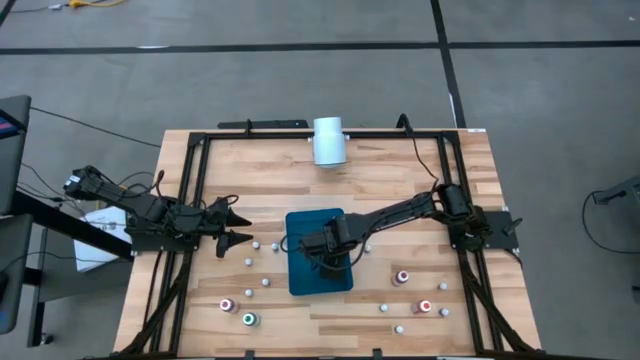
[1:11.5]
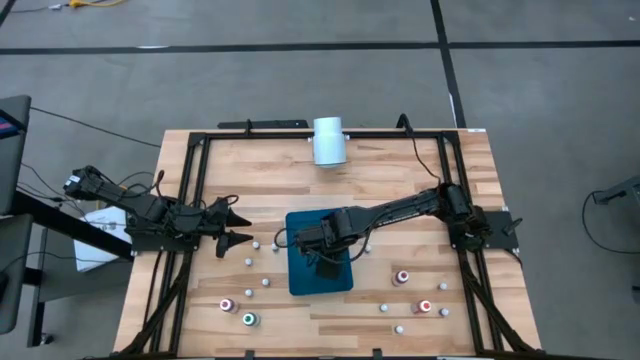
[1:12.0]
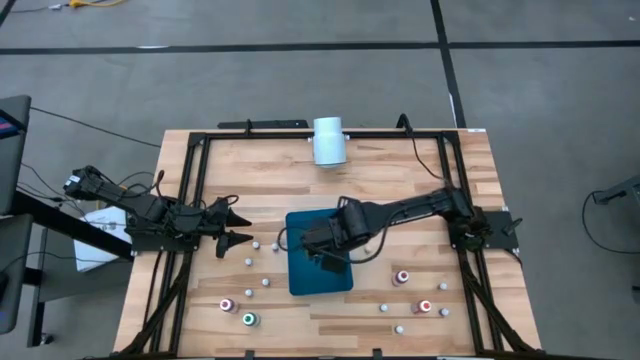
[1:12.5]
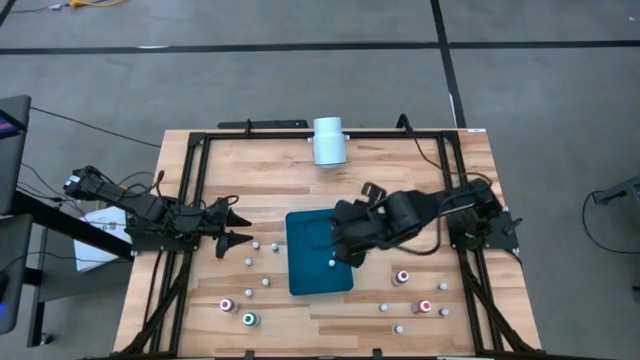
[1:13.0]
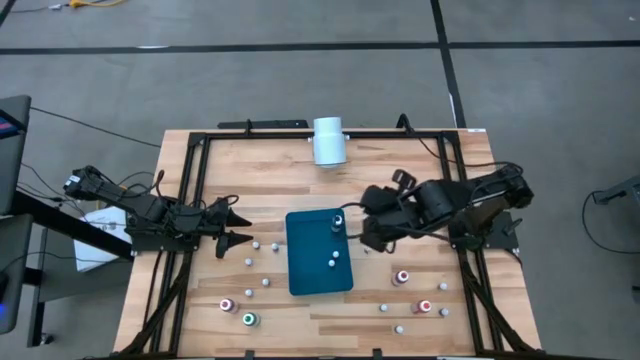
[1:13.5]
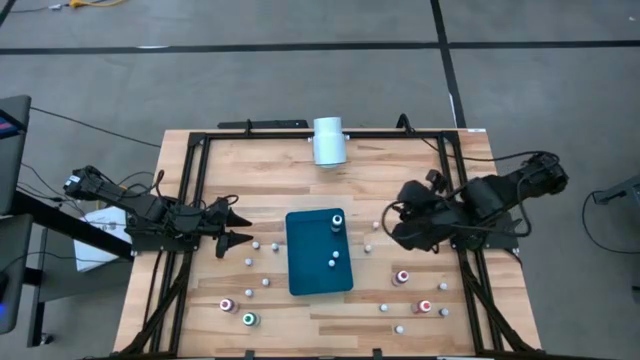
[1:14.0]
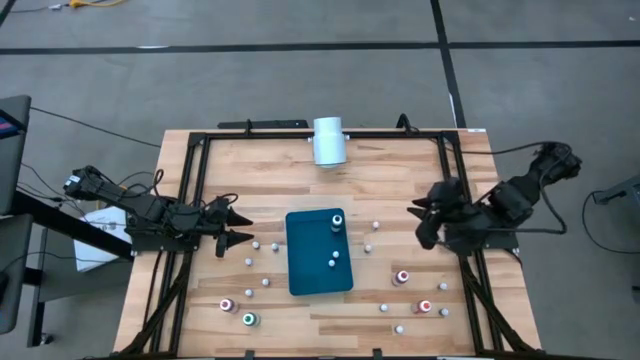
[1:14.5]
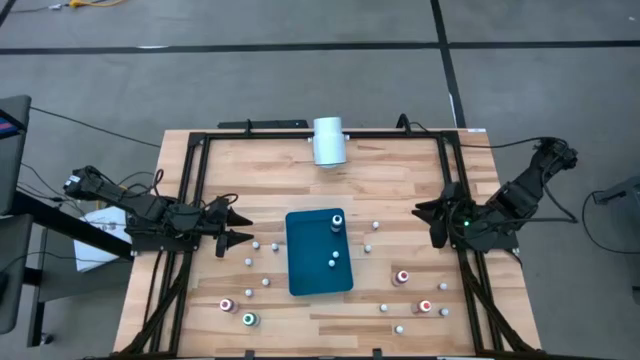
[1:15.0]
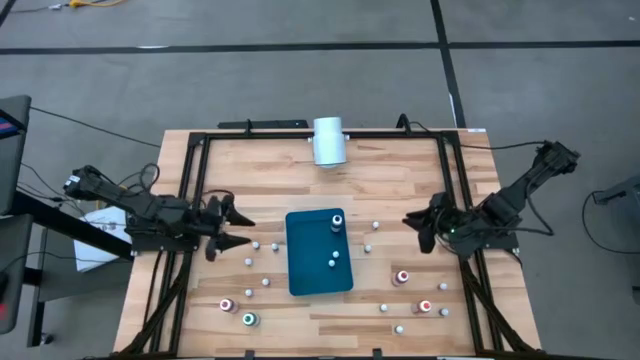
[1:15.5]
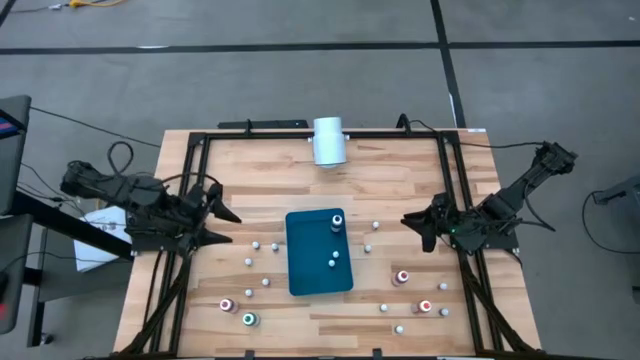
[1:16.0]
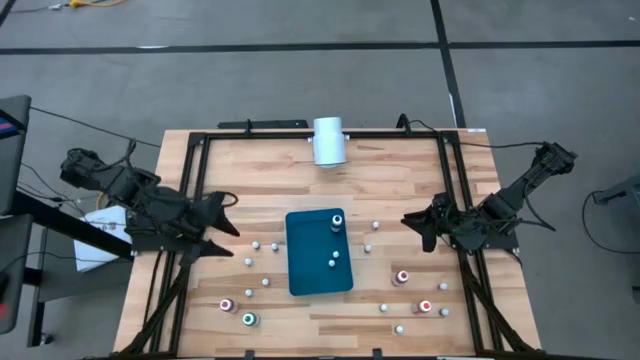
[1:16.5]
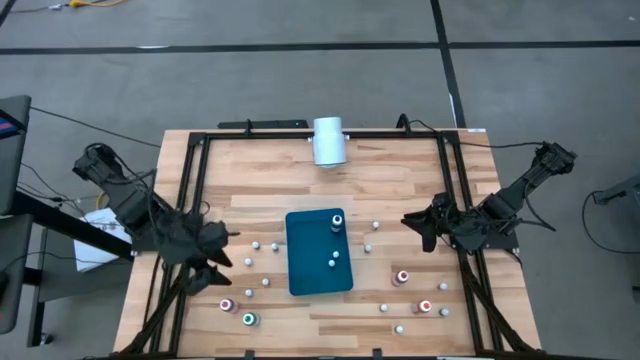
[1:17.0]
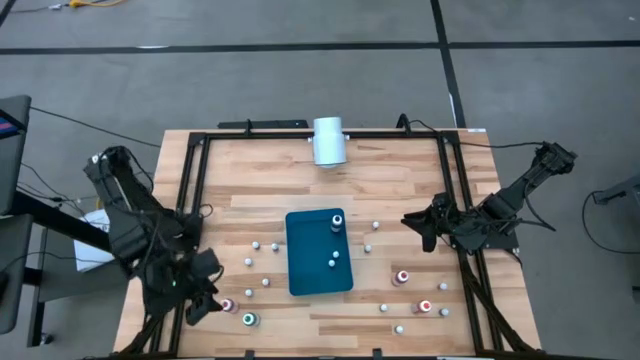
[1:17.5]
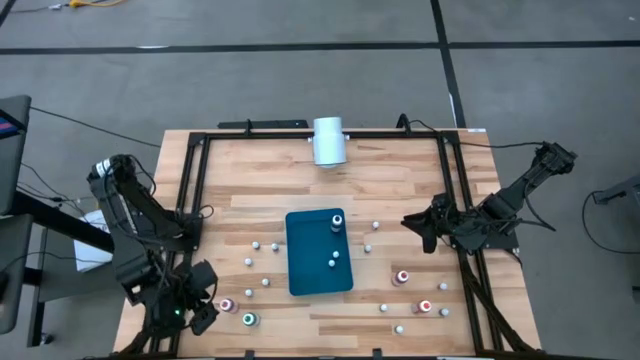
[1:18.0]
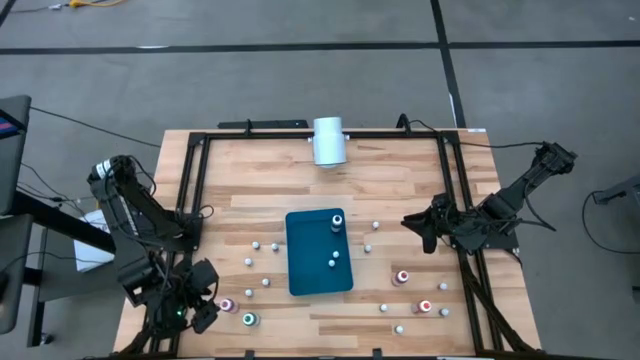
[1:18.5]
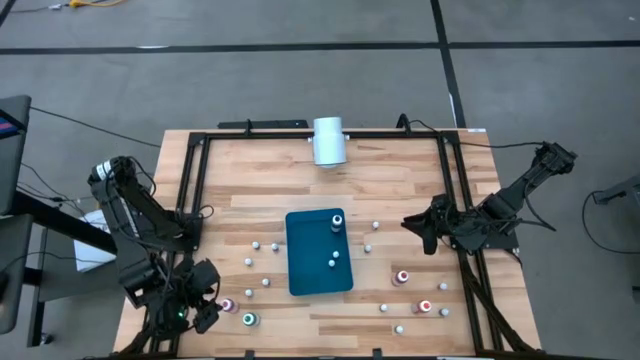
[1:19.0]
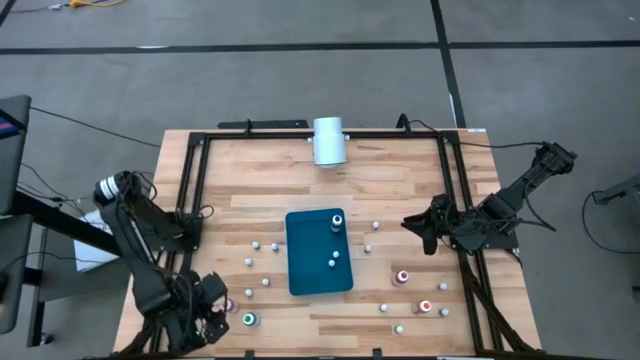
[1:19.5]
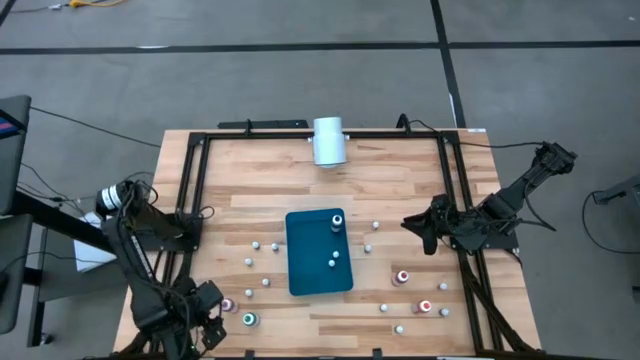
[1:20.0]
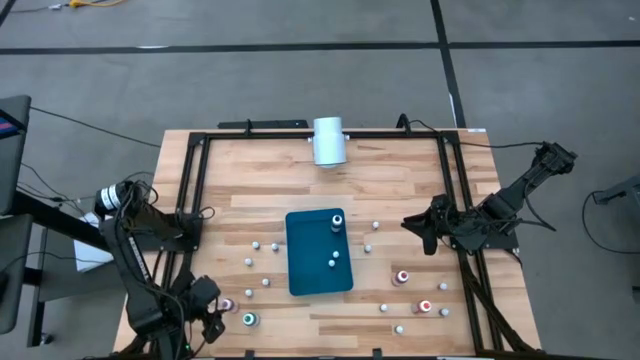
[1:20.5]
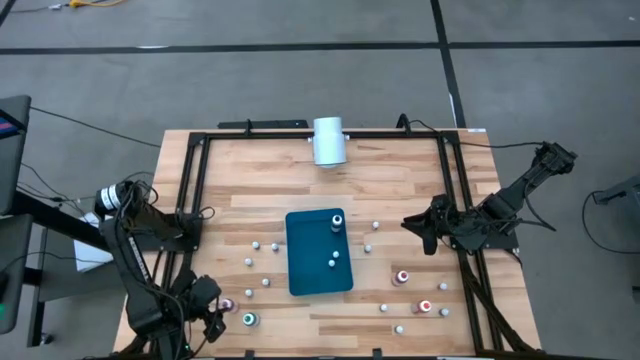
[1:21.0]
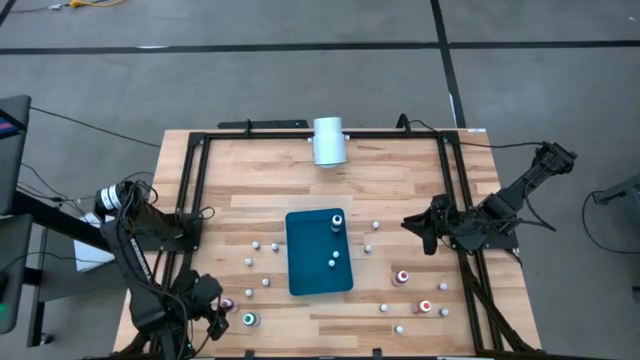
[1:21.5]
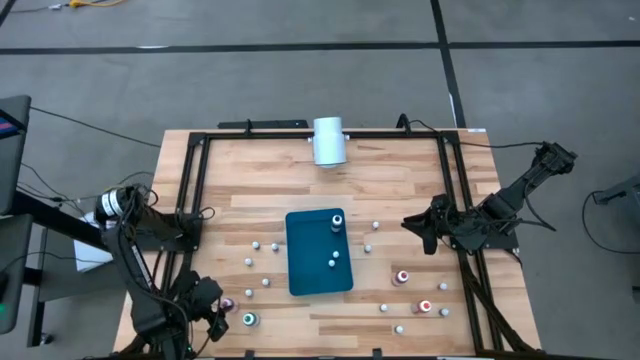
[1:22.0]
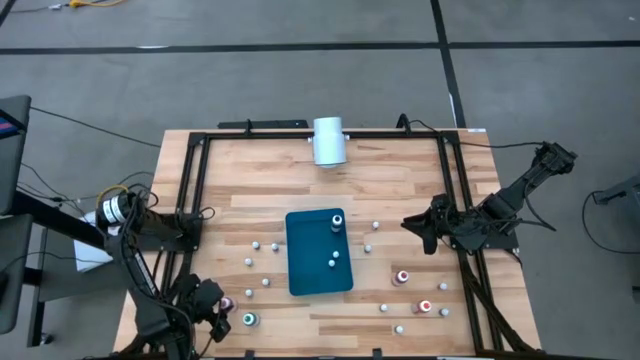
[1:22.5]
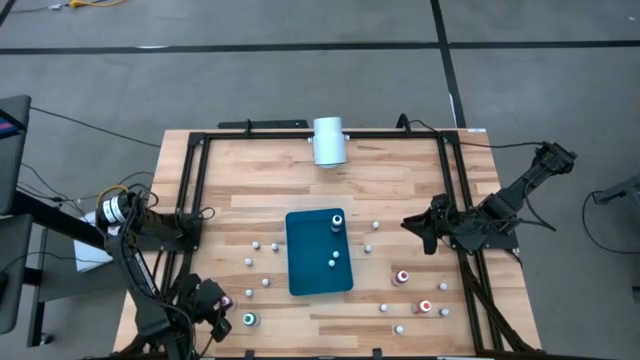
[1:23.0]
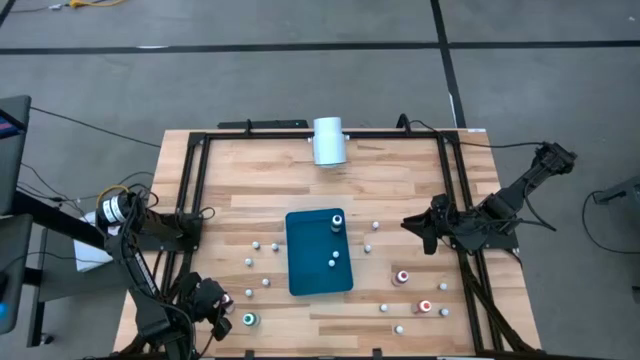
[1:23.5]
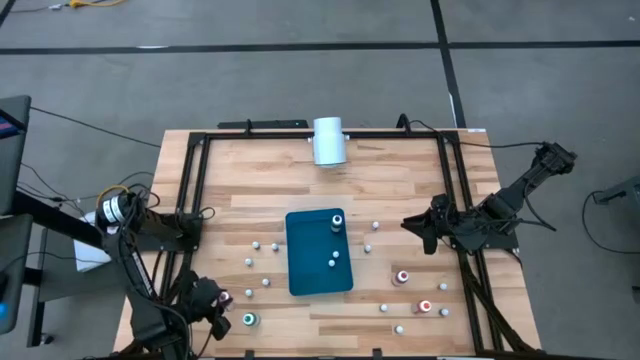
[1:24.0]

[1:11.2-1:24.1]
Task: Pick & Place food coloring
Put the big pink food coloring bottle into the blue bin

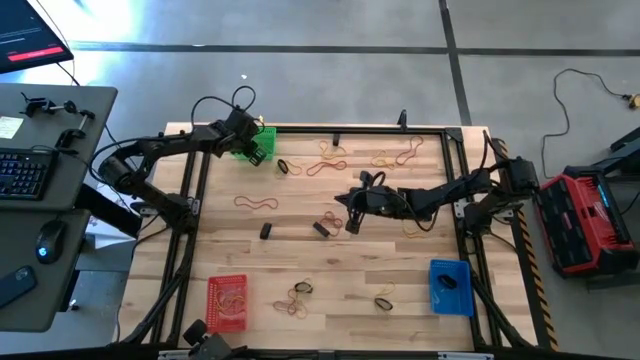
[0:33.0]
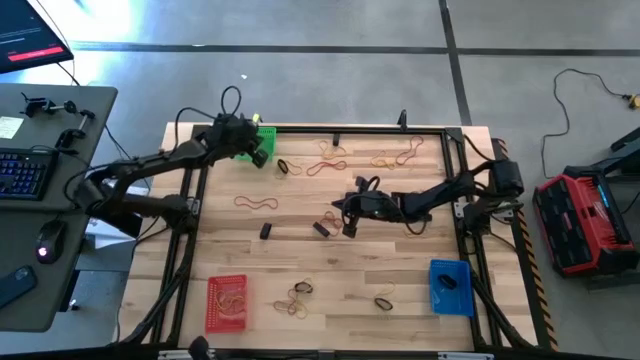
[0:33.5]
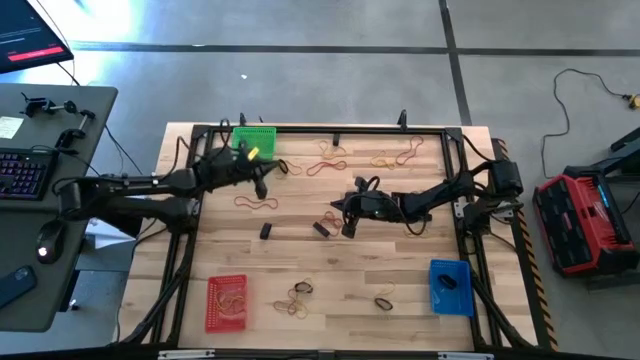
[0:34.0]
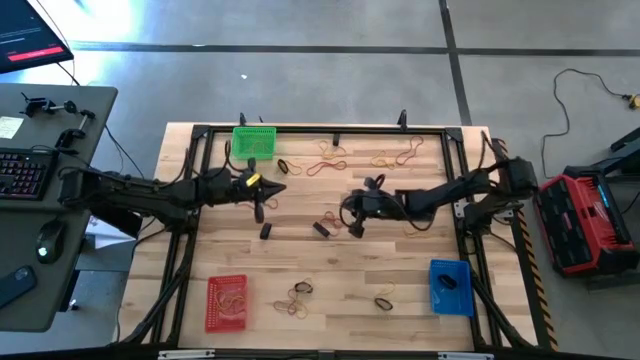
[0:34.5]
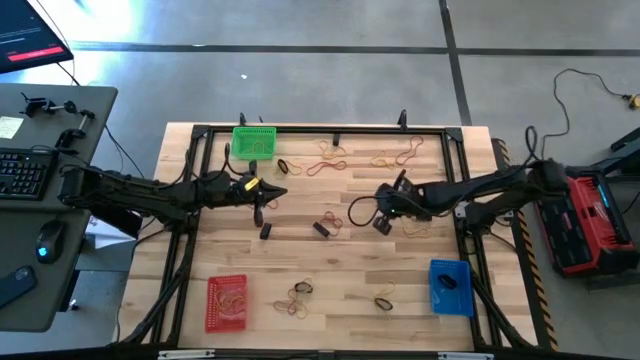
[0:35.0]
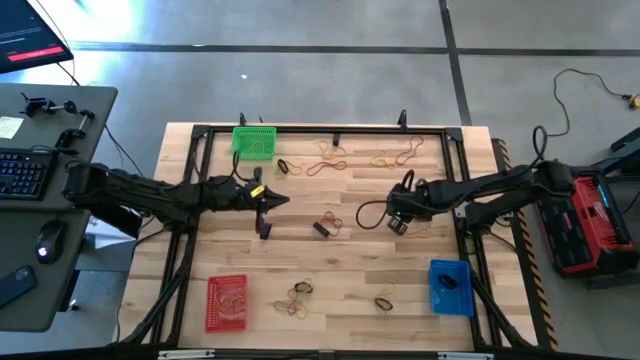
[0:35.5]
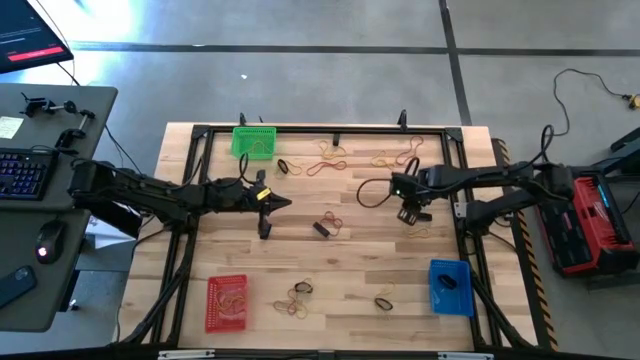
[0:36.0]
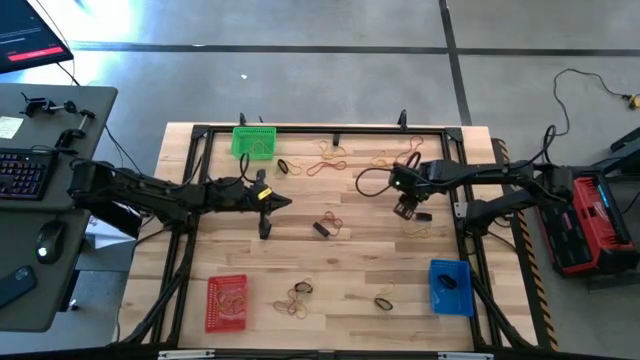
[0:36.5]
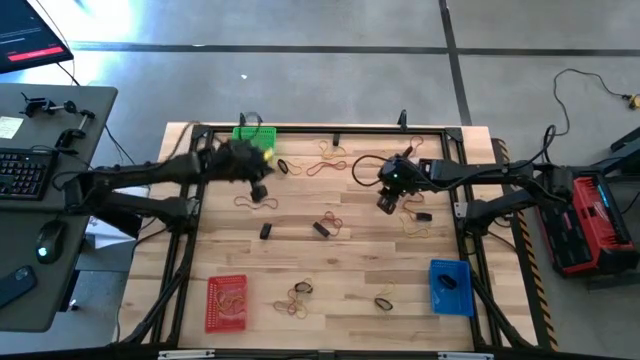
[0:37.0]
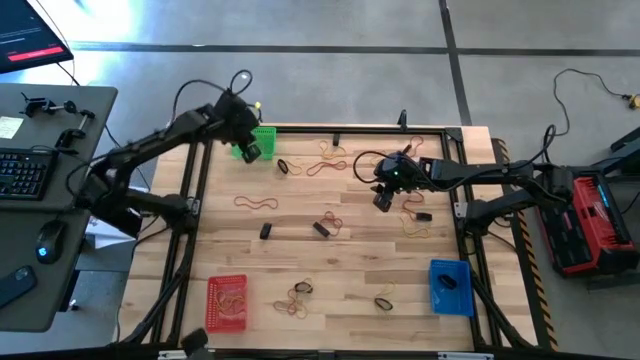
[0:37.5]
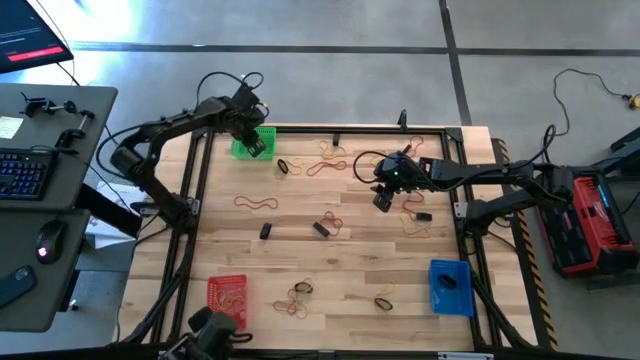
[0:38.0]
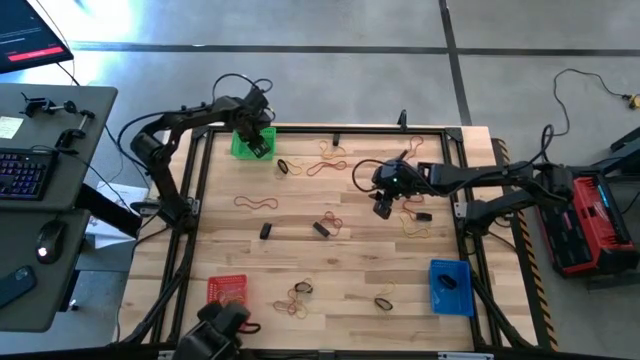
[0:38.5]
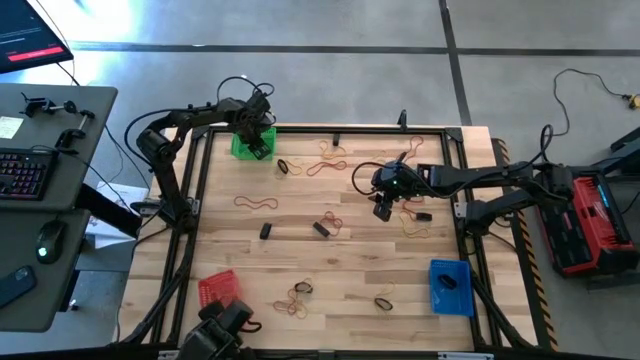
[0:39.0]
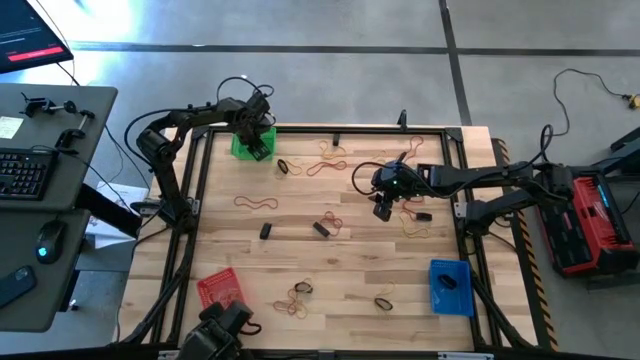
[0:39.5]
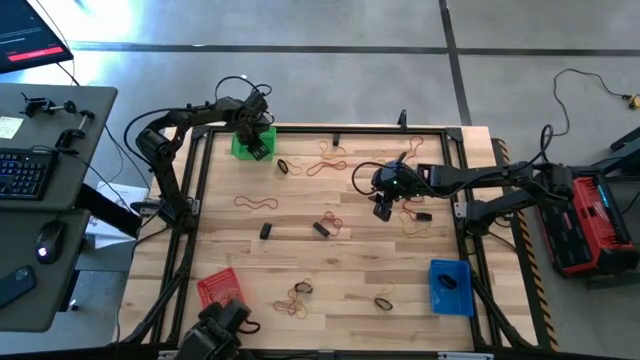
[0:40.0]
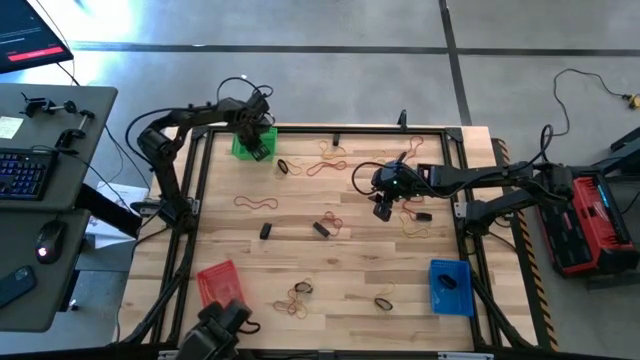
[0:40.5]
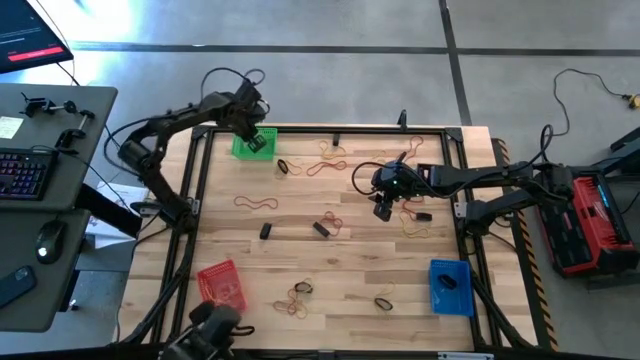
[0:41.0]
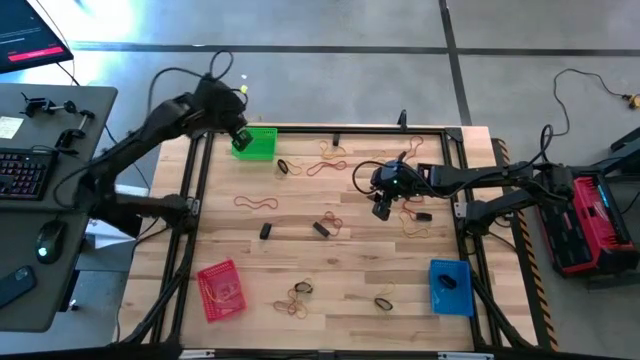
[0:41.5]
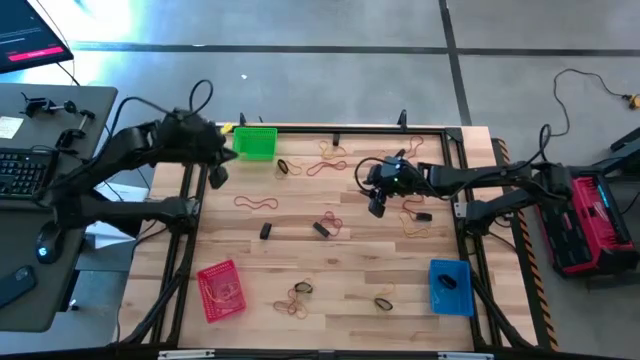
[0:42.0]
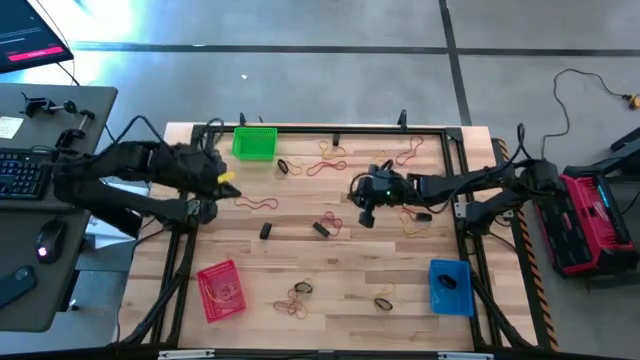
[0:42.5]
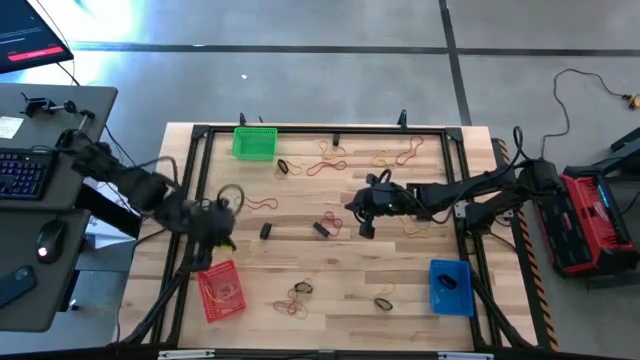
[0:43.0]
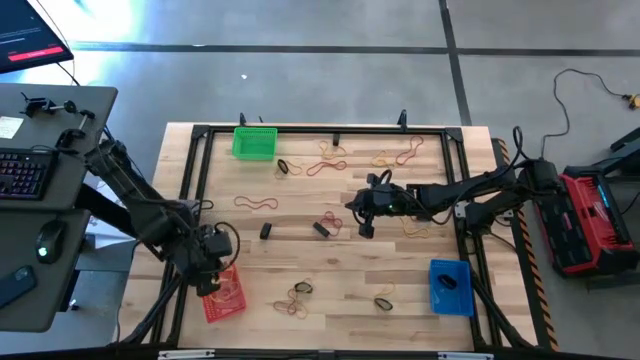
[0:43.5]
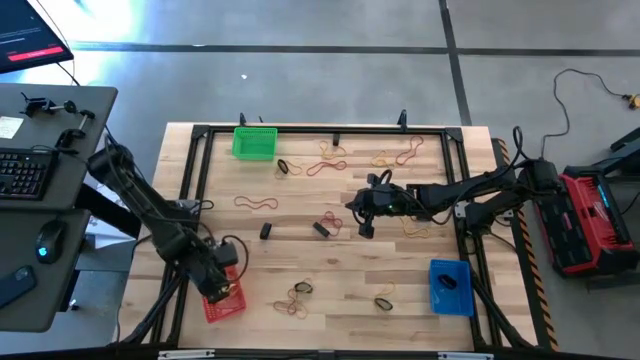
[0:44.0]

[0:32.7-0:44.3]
Task: Sort rubber bands into baskets
Put the yellow rubber band into the red bin
